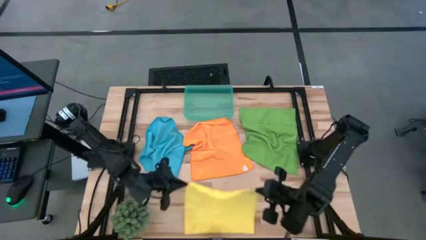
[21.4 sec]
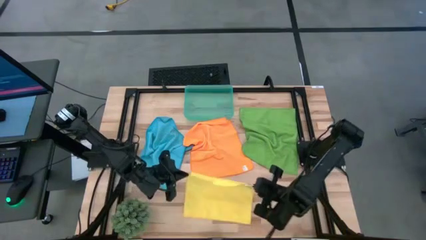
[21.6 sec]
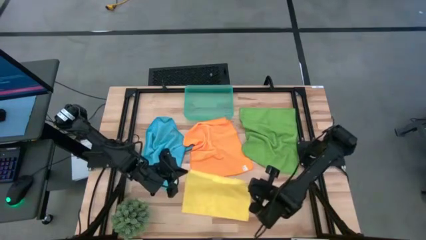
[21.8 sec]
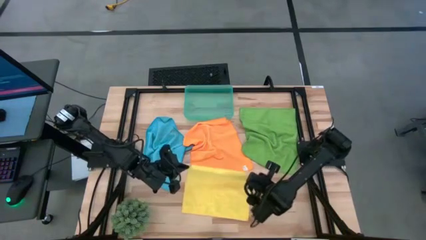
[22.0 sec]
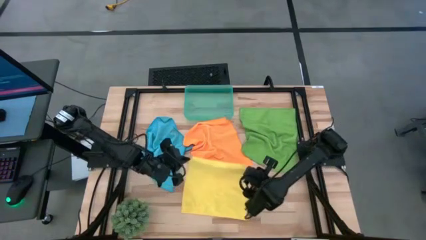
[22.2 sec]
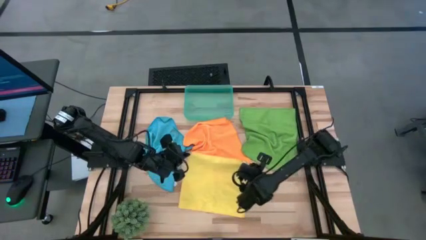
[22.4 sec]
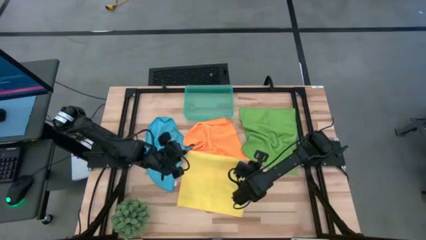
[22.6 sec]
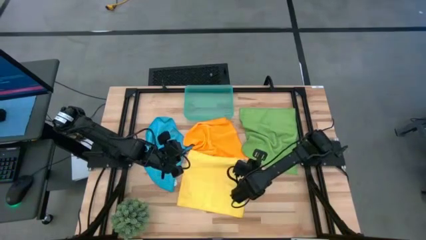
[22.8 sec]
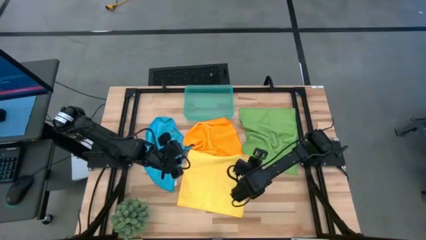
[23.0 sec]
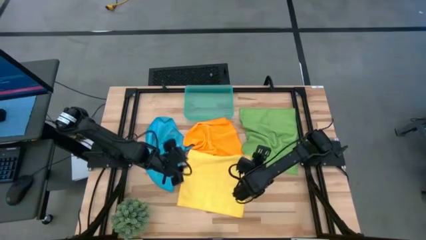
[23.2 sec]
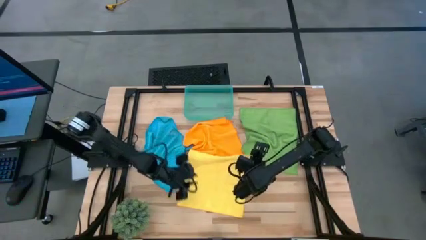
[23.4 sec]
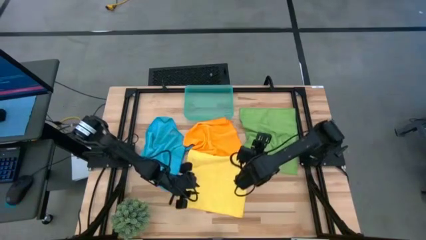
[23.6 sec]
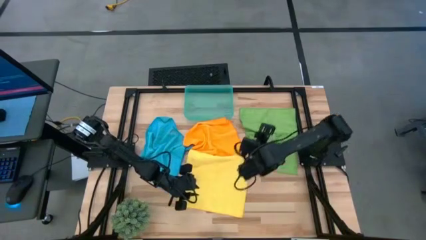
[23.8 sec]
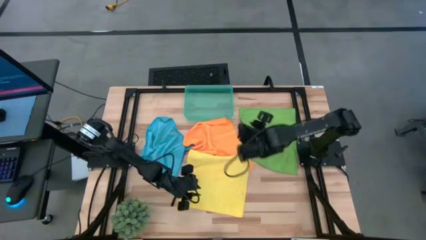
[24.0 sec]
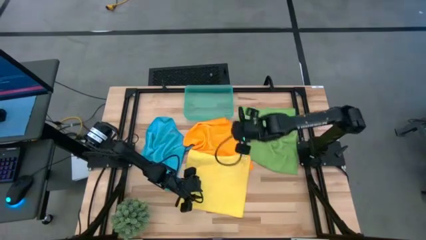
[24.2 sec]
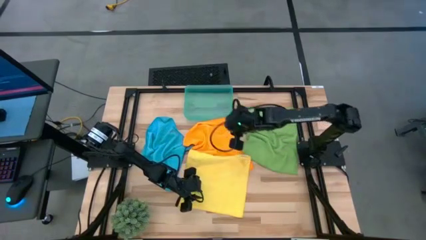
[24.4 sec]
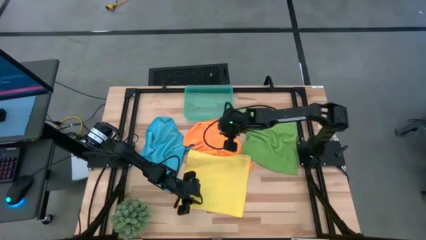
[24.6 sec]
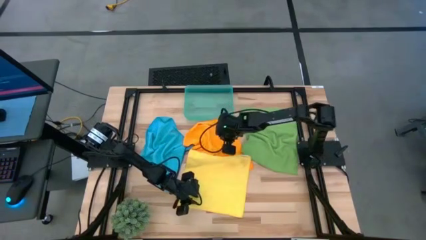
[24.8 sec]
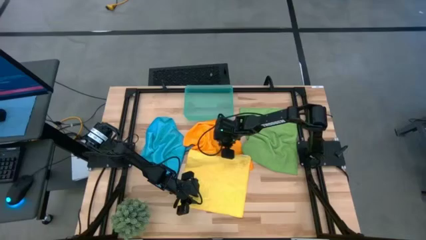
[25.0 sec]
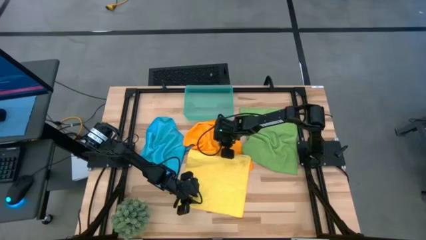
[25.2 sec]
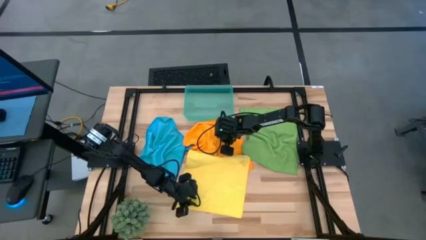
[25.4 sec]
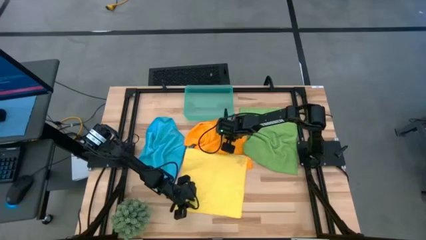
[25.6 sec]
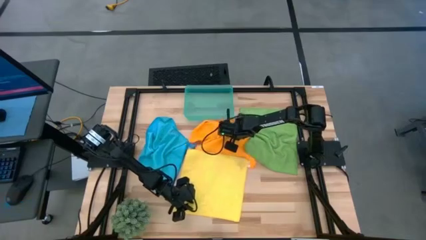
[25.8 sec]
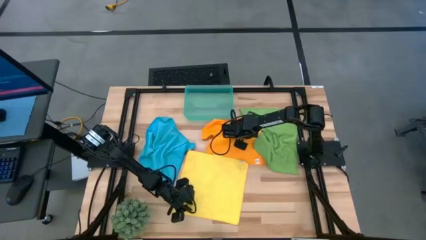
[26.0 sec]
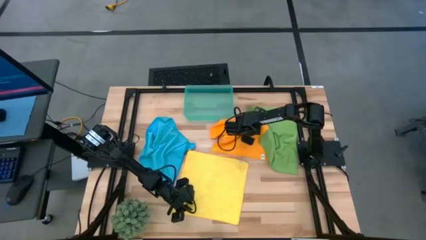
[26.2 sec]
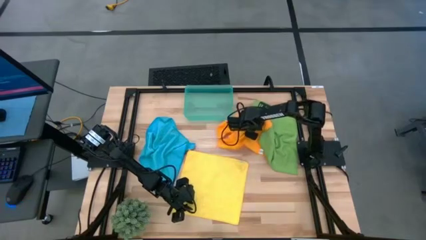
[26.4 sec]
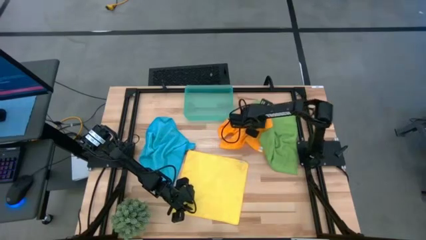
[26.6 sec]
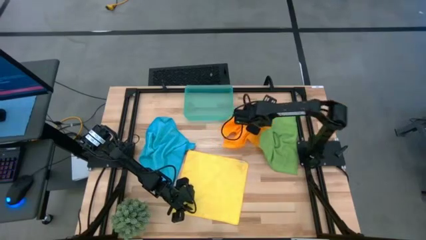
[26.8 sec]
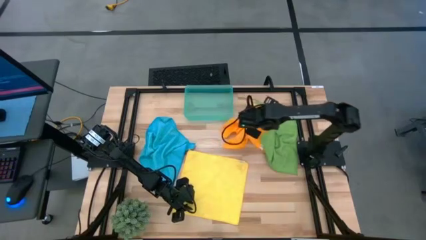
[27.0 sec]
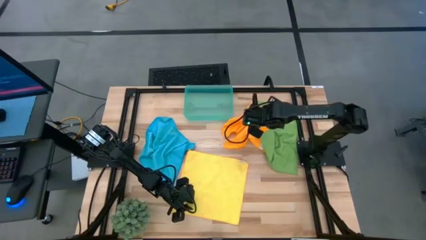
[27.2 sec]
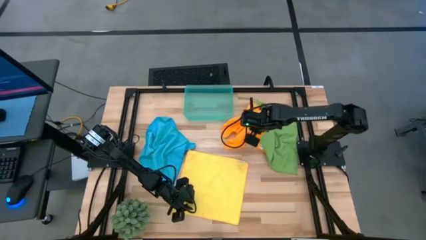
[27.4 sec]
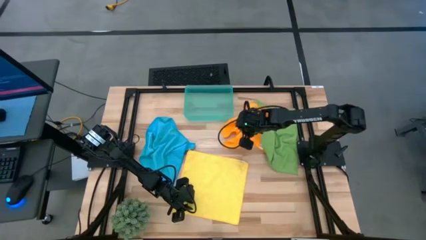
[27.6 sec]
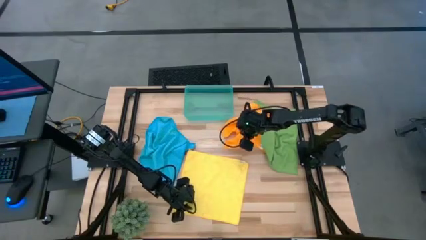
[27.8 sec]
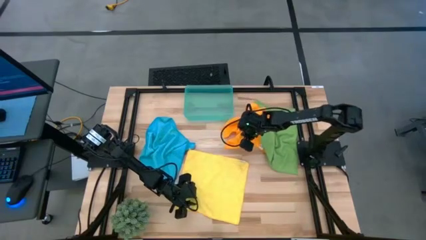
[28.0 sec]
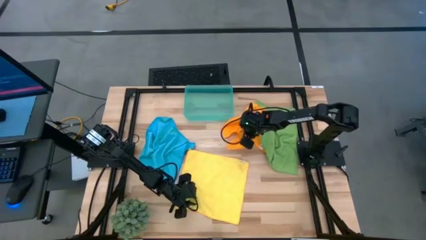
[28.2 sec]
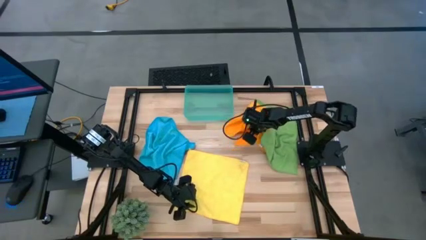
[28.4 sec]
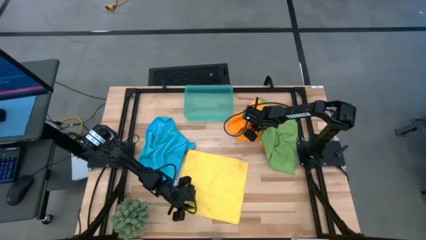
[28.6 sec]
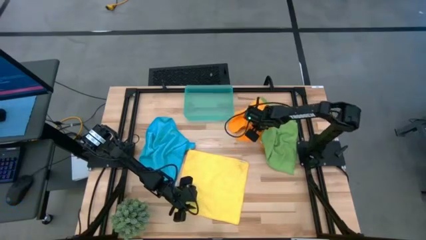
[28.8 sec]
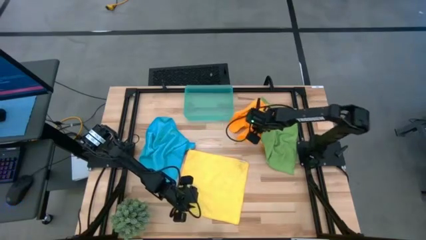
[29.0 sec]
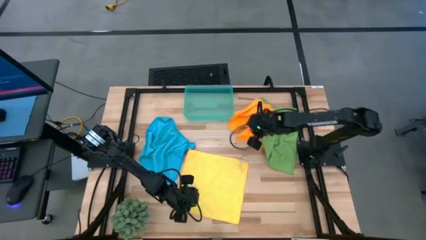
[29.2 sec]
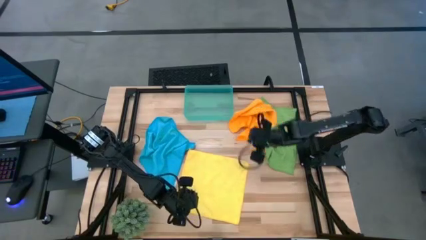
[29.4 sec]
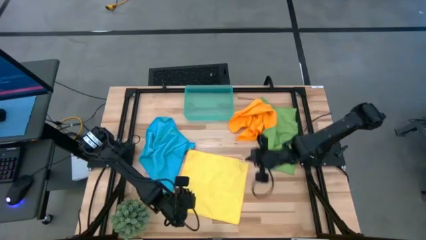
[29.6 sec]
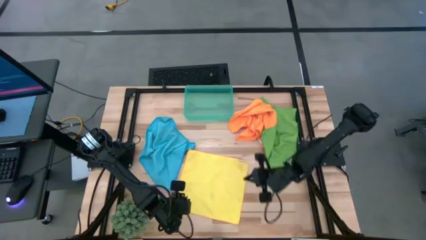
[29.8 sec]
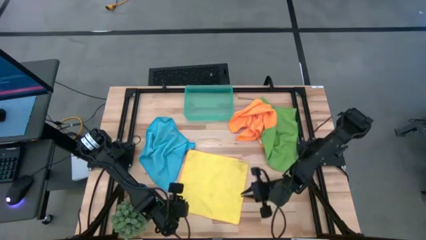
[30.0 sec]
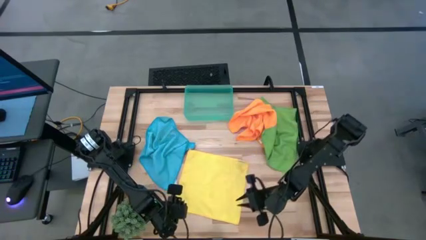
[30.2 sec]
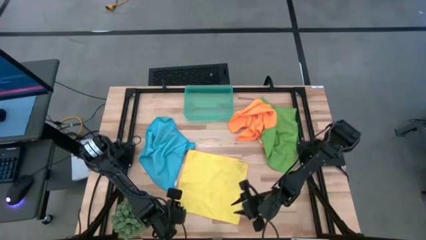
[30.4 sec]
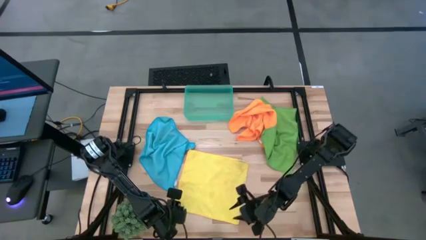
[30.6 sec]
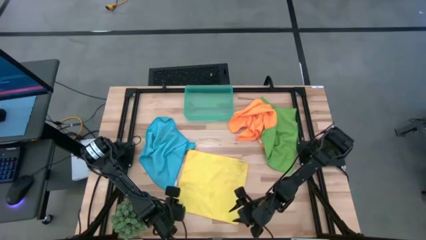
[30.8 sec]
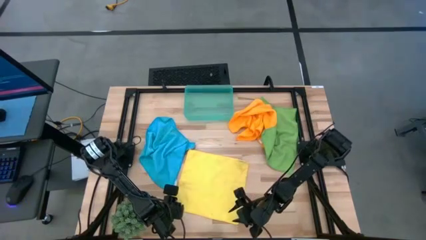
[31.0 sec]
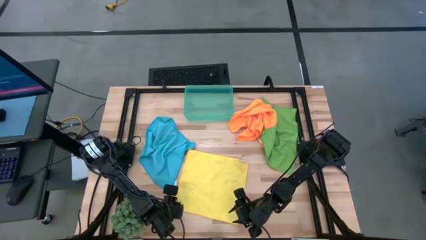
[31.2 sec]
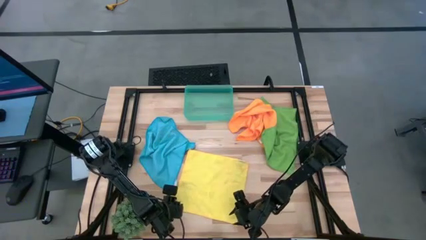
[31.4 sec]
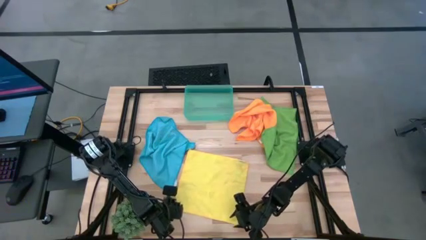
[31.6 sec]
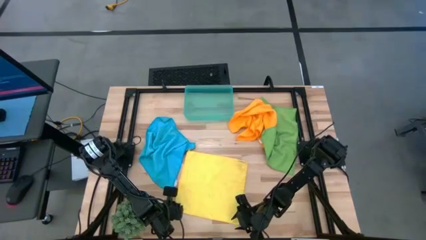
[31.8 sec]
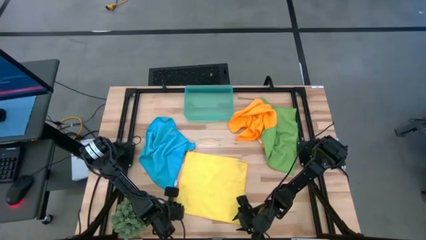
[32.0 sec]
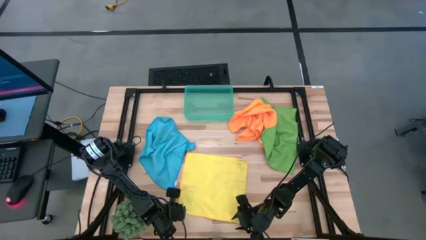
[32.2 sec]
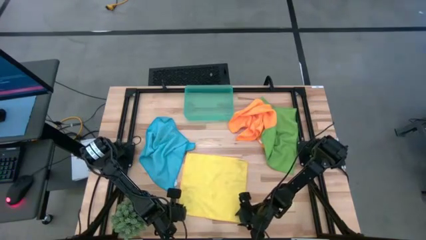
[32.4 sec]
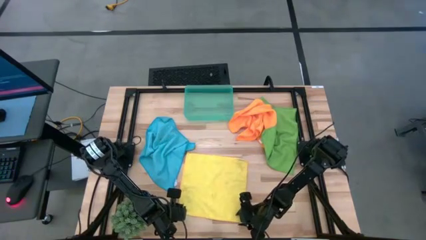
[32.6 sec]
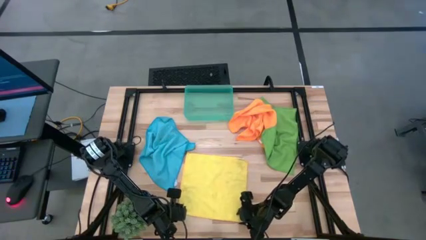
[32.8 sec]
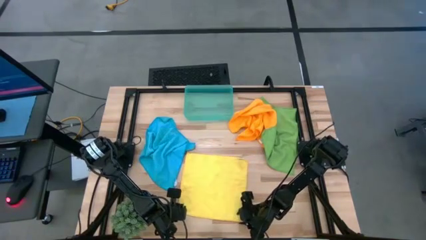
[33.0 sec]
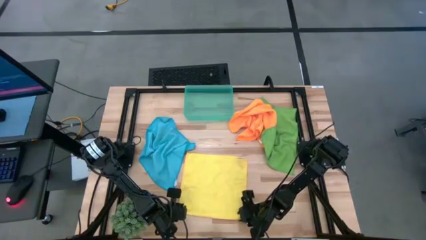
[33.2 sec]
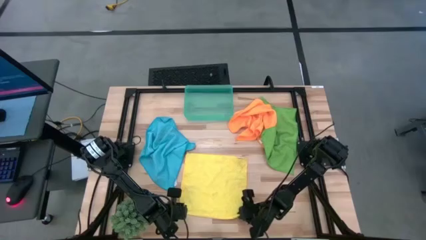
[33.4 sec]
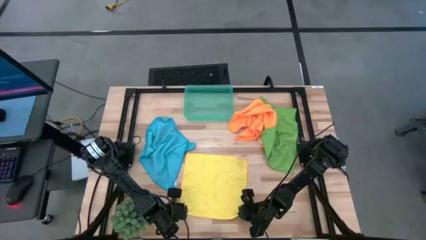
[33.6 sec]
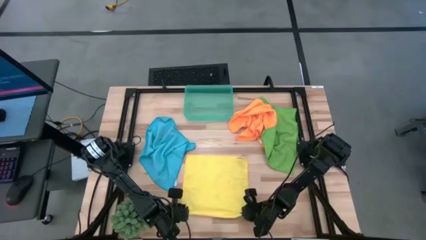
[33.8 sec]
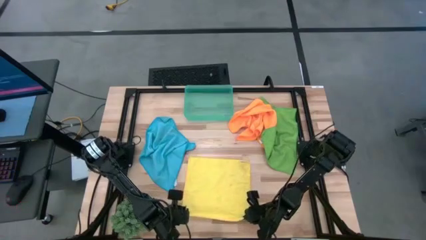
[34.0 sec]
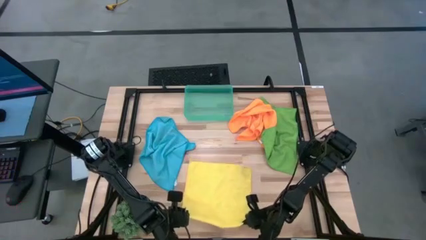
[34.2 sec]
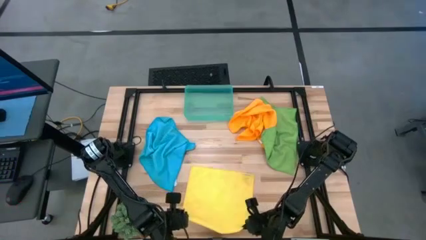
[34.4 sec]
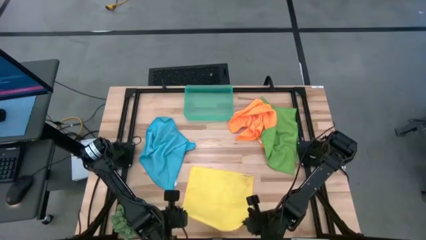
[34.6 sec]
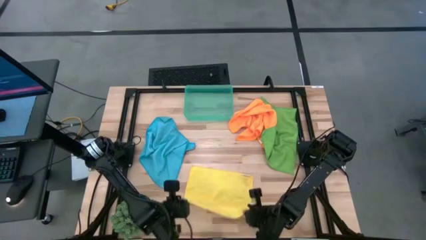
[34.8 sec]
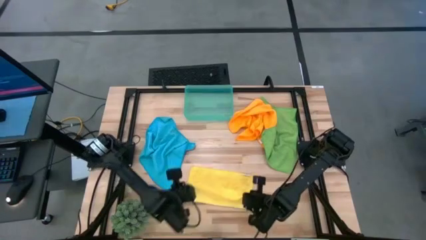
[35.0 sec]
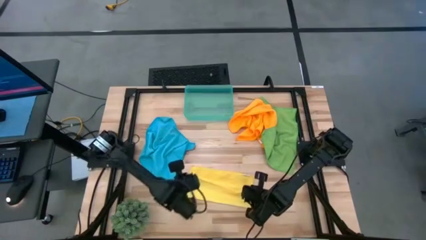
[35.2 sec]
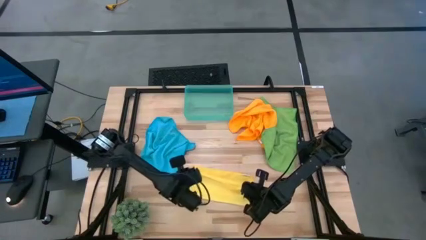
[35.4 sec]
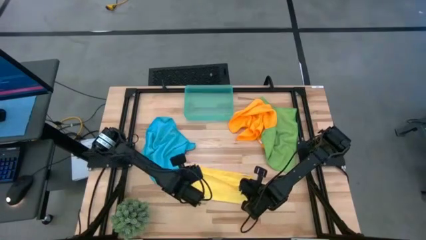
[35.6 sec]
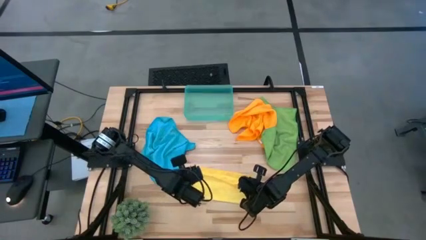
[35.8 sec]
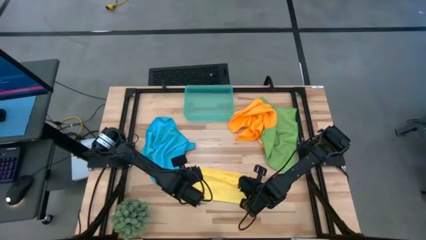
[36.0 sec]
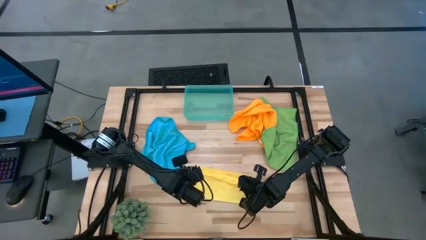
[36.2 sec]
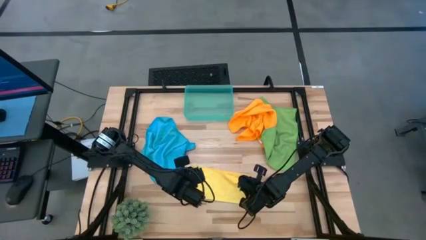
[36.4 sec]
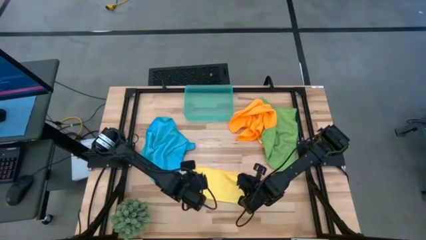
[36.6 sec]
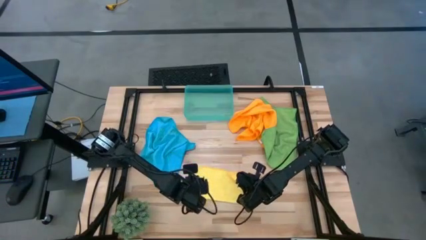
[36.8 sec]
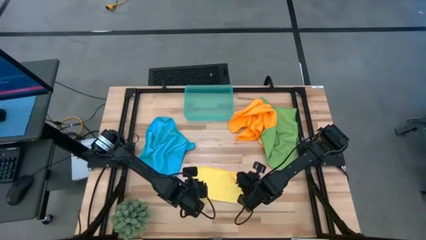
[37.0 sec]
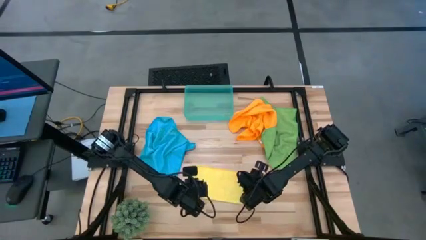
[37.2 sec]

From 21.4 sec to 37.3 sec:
Task: Roll microfiber towels into tight, uniform cylinder then place into a basket
Fold the yellow microfiber towel
